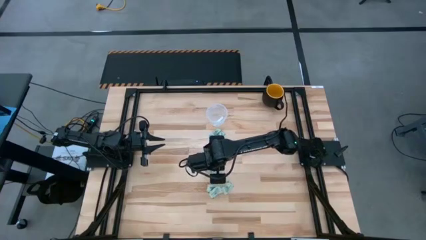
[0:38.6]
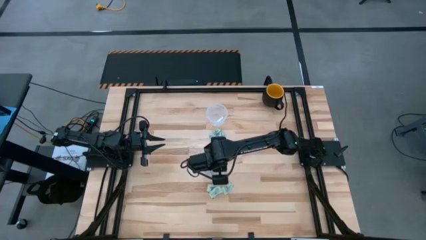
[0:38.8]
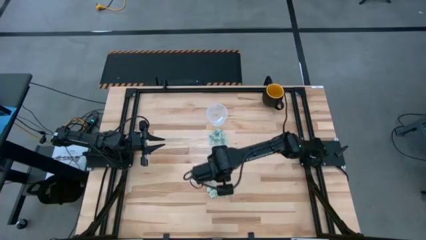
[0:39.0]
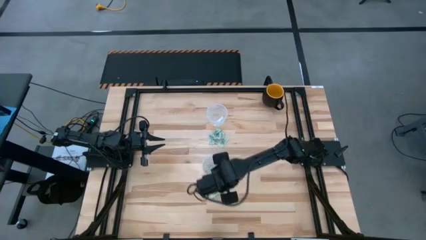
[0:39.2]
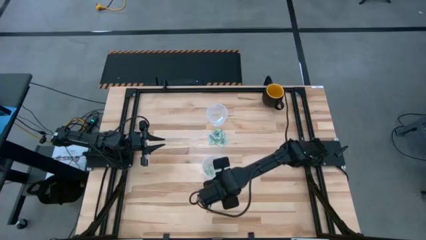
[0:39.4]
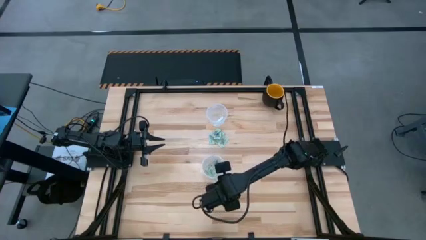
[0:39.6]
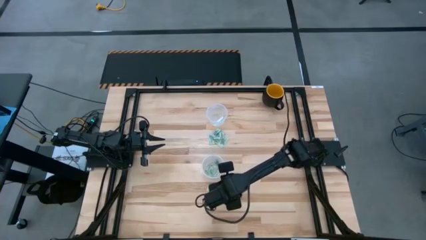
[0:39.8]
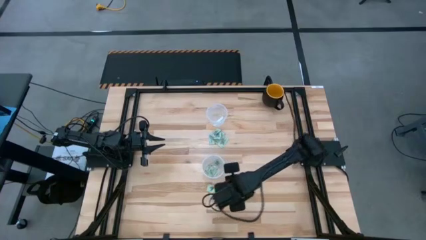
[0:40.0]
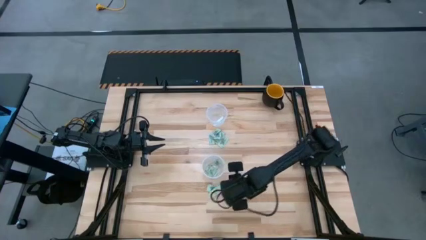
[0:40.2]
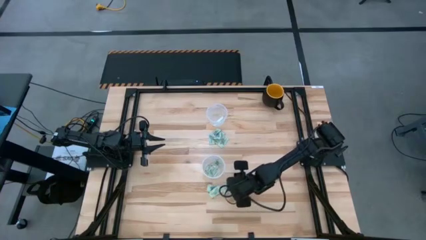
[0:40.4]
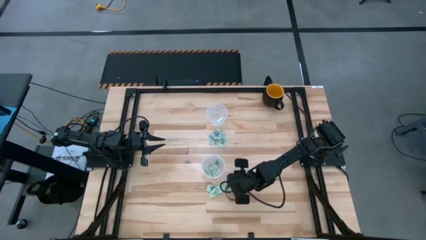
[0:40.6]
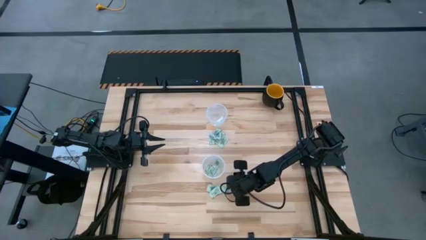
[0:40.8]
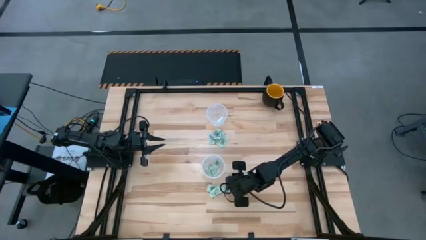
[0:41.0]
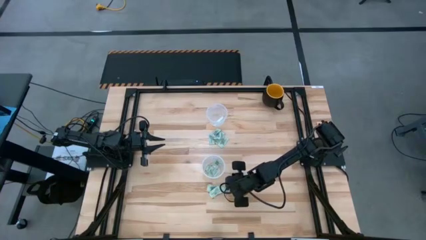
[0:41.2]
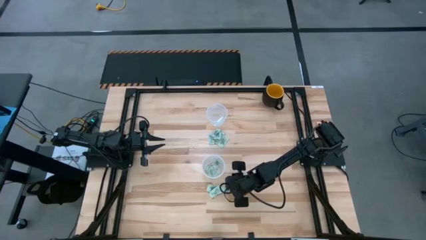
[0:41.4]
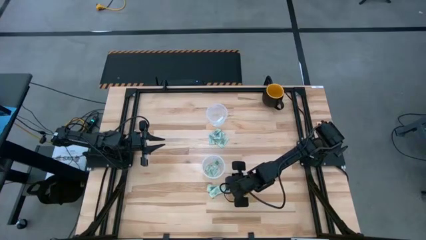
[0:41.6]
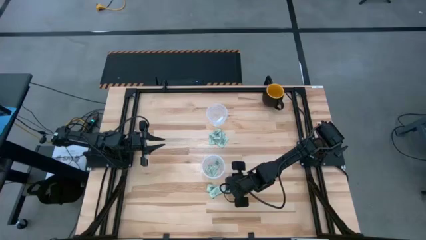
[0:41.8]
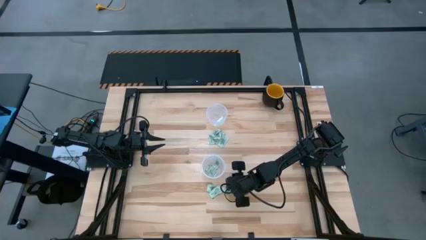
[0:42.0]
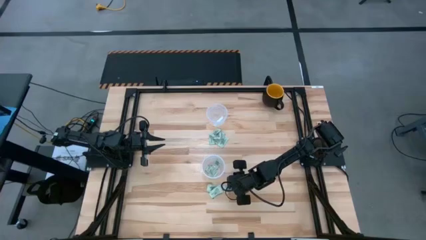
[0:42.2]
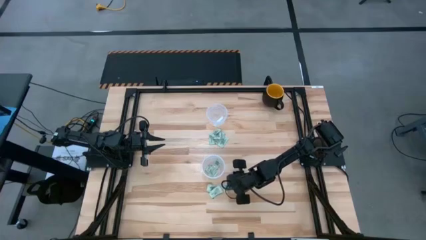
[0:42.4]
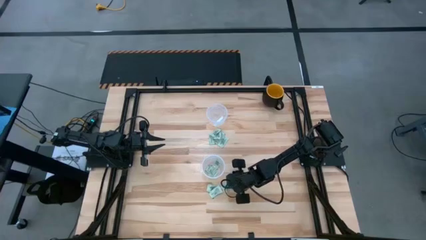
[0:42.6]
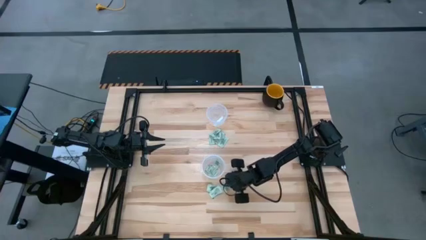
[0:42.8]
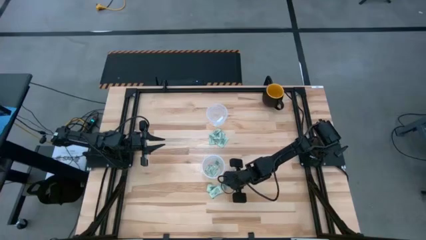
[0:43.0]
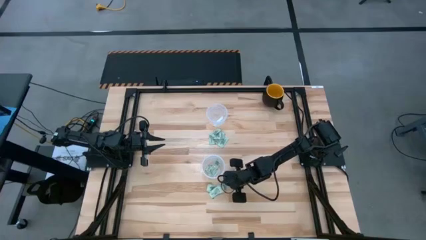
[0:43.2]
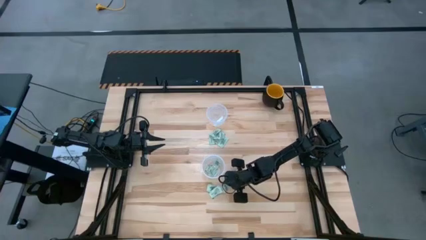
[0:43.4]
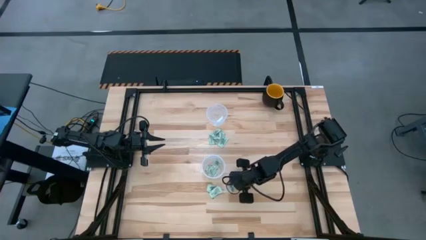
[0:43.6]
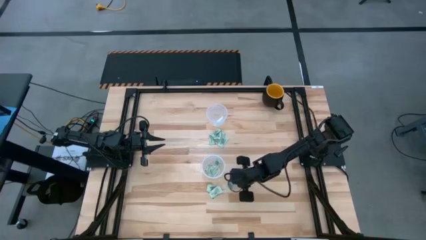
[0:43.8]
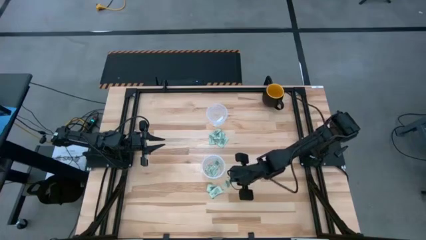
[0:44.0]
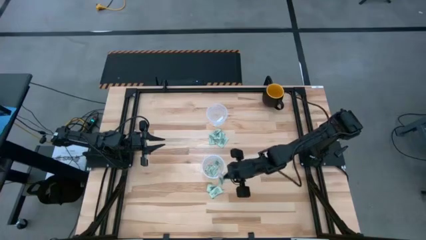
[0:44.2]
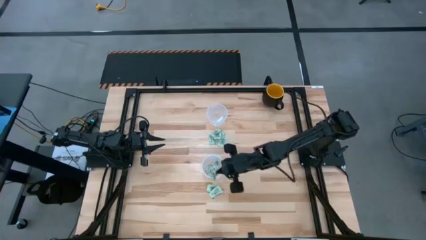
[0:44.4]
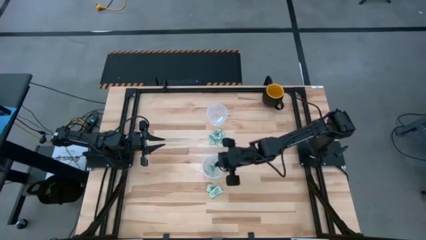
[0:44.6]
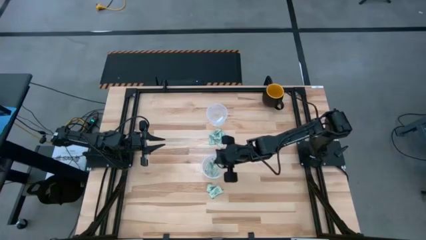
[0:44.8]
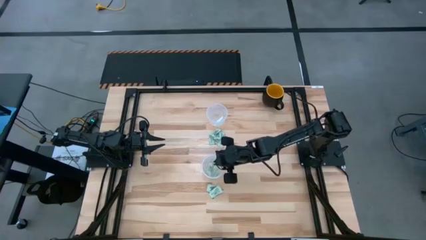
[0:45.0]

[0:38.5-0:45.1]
Task: Pick and place items into bin
Put the bottom right stevia packet into the bottom bin

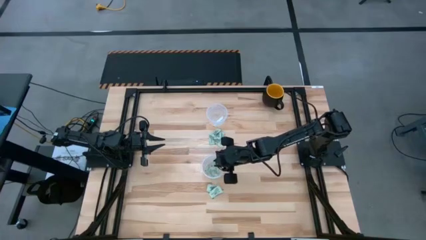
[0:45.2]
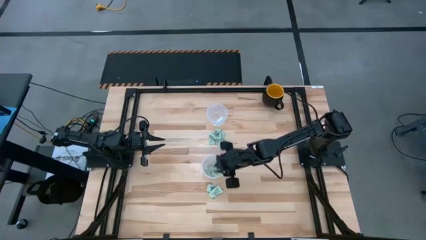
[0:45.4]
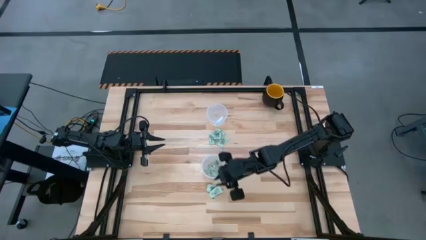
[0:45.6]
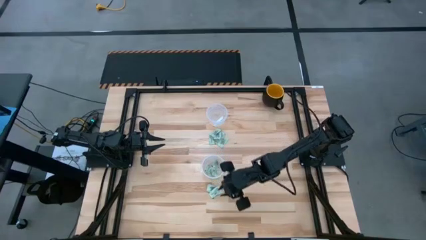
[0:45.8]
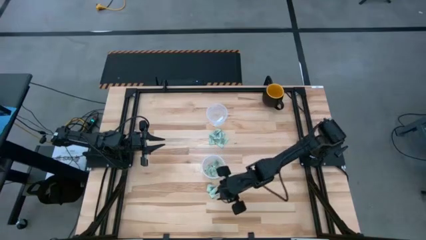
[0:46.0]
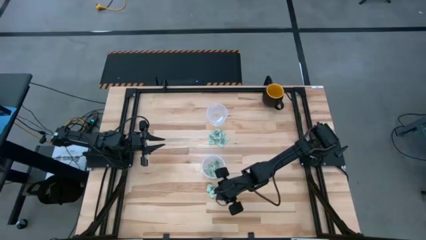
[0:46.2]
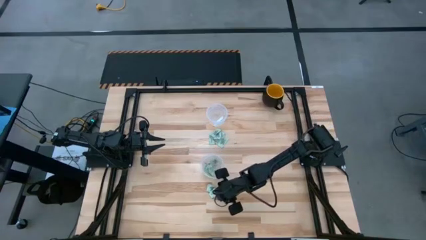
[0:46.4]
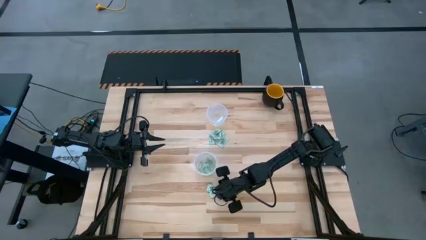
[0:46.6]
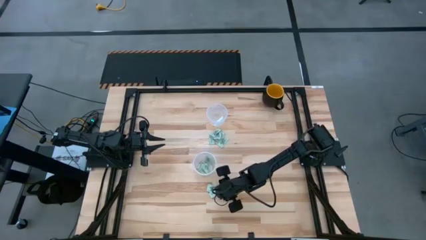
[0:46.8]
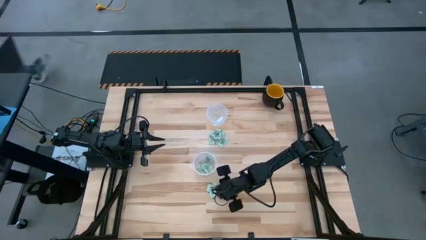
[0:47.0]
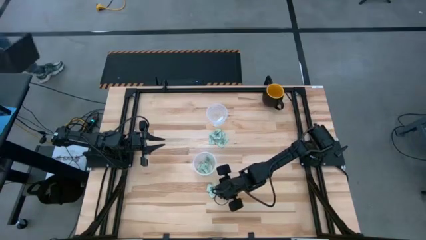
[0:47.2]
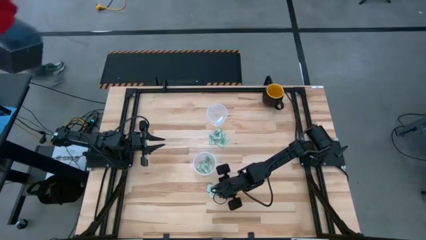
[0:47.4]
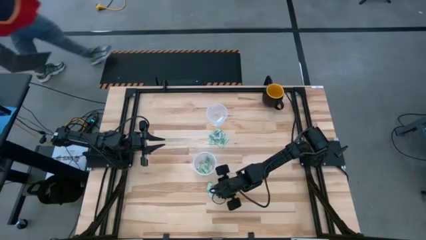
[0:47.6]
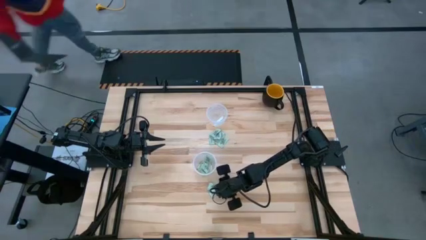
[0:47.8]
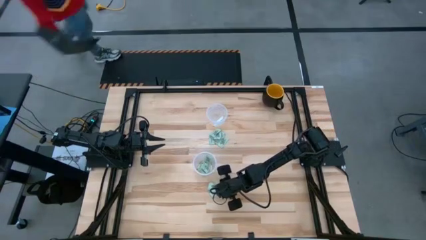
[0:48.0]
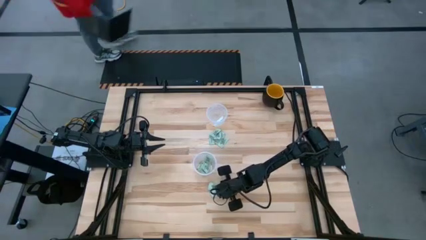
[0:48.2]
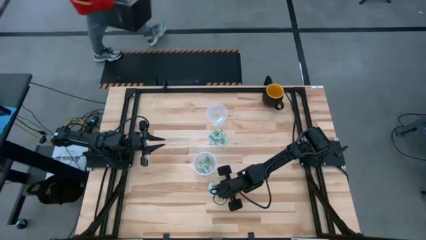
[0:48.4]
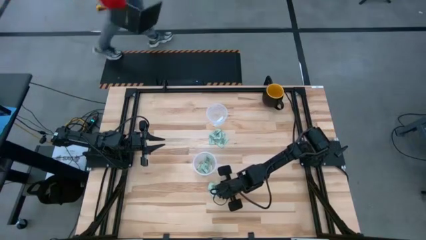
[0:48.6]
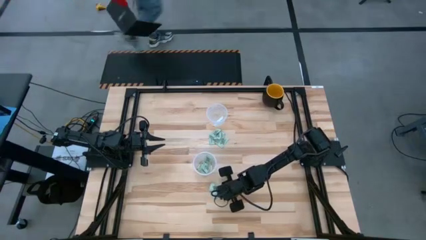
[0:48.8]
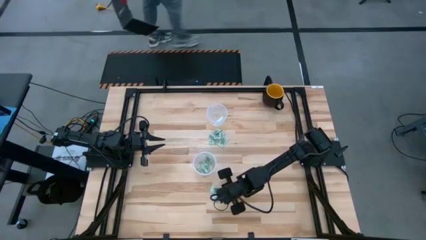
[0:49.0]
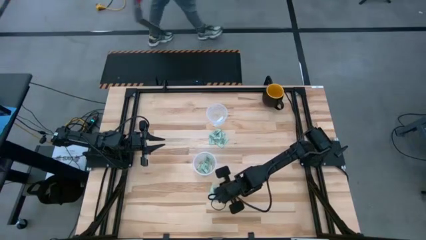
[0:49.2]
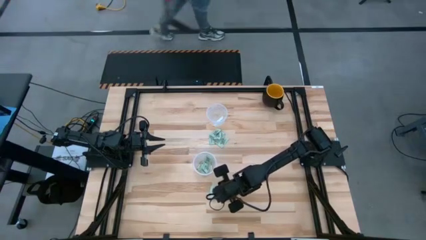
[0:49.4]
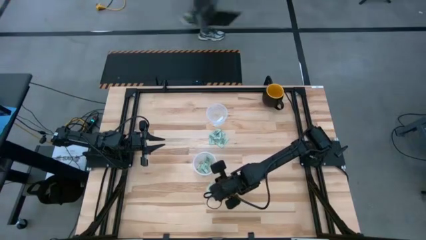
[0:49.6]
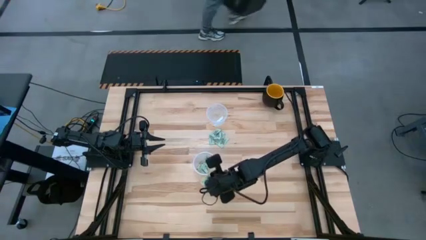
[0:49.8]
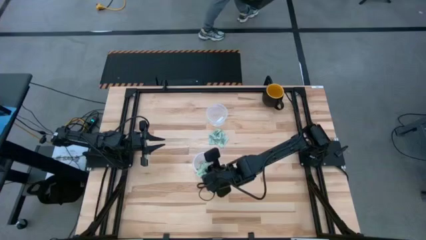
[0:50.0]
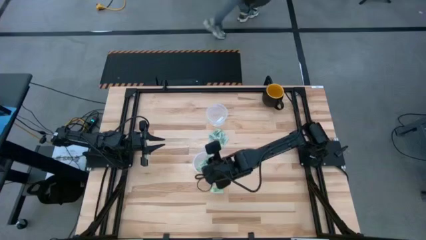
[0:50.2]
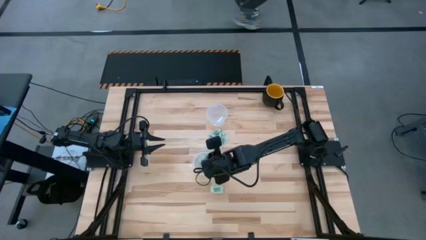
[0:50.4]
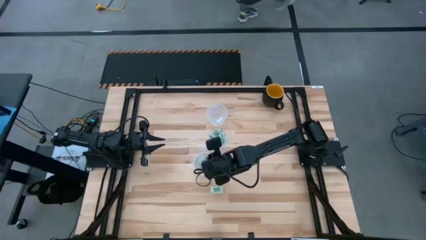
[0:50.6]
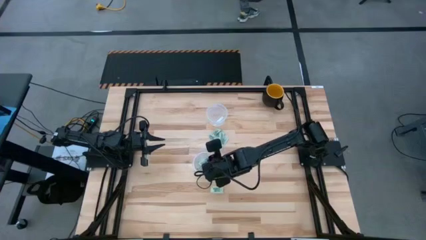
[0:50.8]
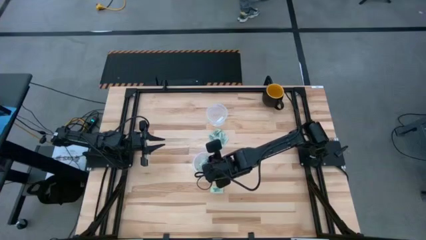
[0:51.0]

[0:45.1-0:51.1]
Put the bottom right stevia packet into the bottom bin

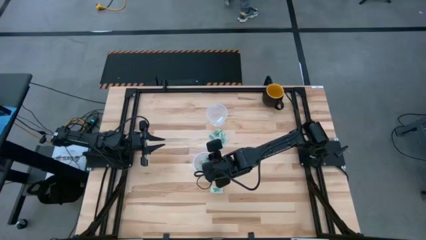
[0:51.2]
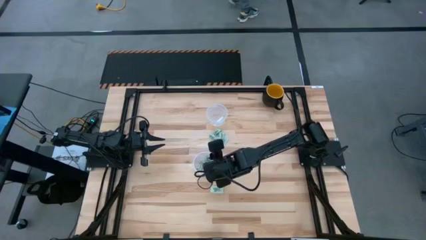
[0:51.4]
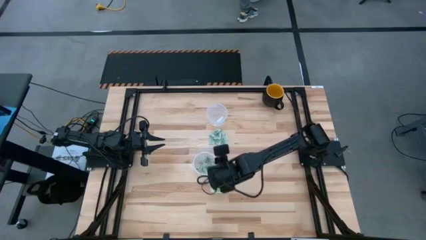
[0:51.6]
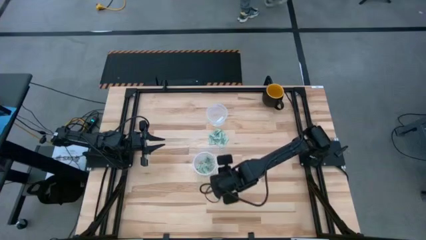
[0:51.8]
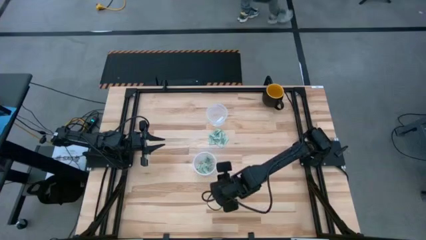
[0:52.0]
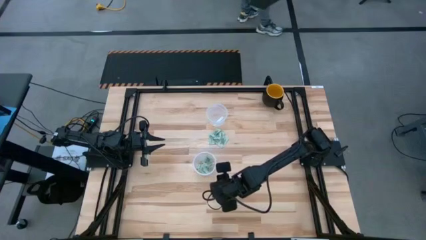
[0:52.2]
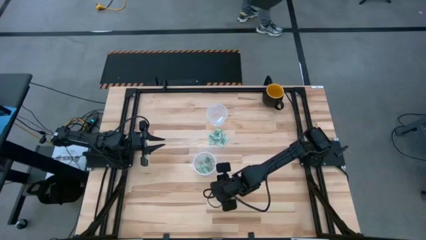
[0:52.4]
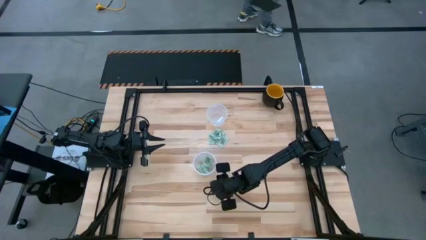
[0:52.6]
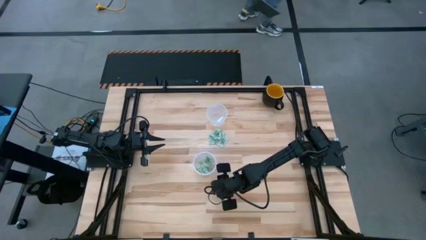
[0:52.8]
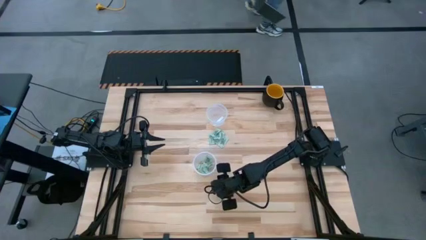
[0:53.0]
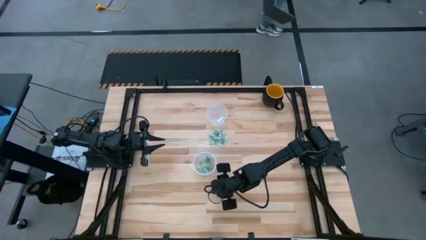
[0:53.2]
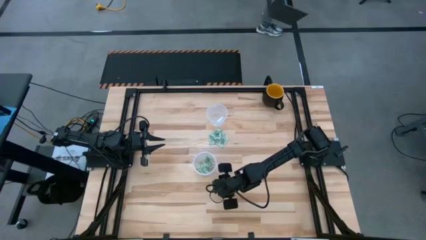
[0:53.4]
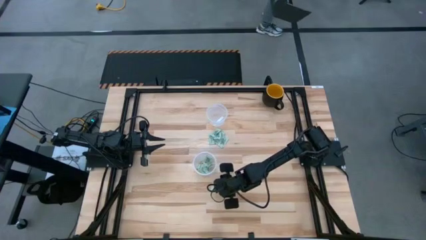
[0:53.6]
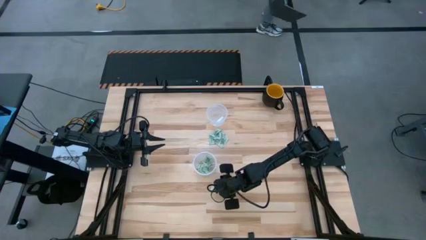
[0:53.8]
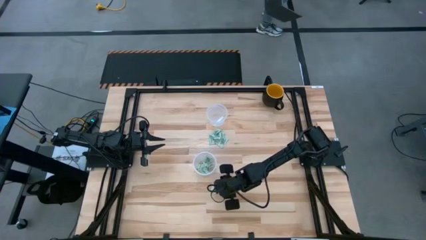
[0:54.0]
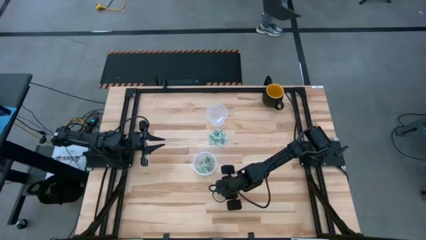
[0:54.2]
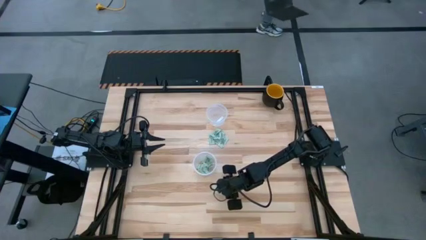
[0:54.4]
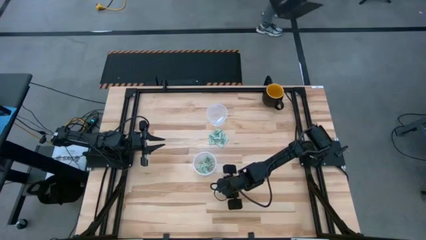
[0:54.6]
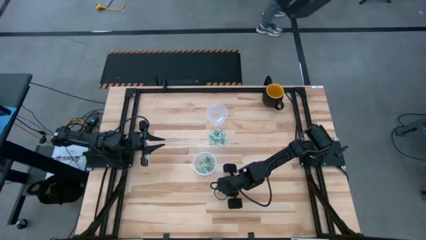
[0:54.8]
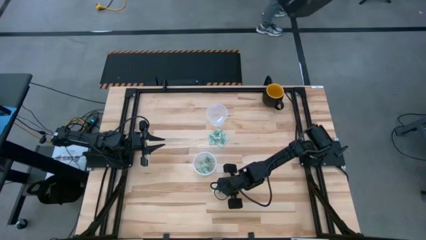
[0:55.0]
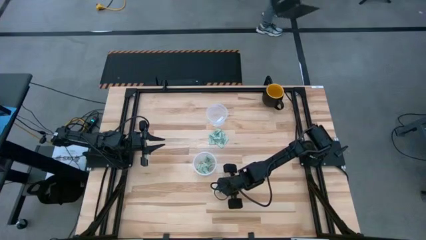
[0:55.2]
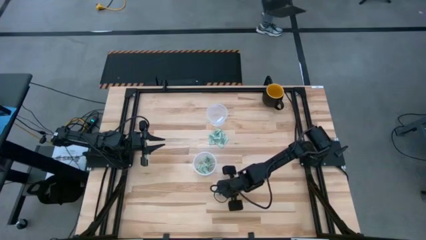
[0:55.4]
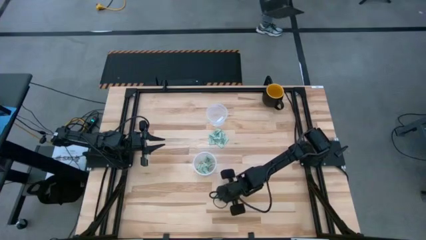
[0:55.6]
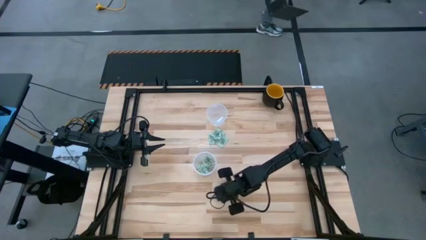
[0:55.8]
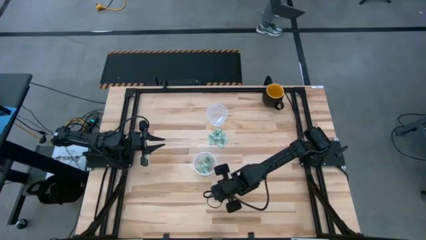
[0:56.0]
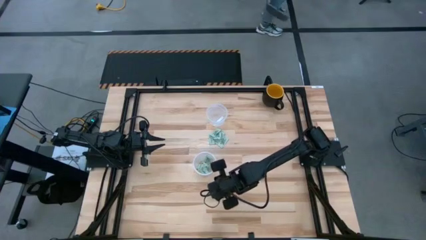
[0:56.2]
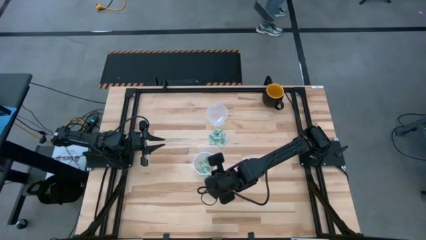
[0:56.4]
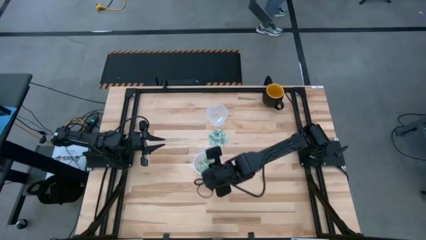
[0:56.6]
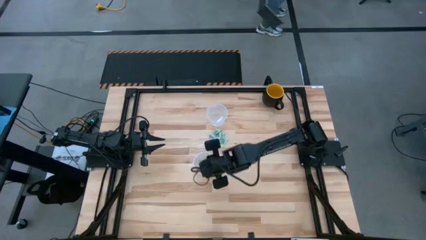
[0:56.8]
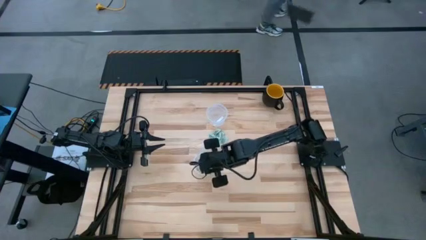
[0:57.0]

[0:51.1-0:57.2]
Put the bottom right stevia packet into the bottom bin
